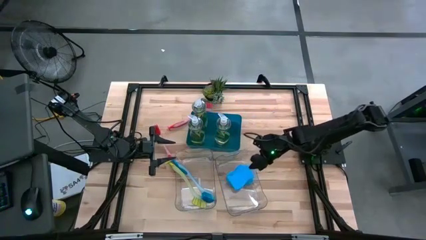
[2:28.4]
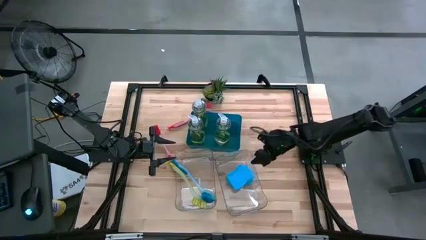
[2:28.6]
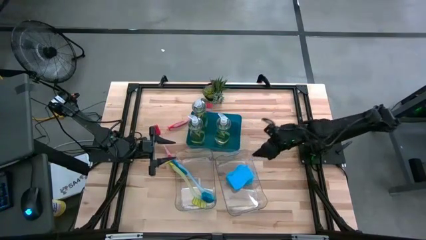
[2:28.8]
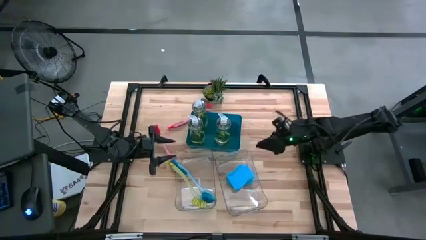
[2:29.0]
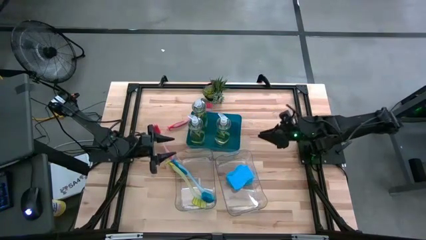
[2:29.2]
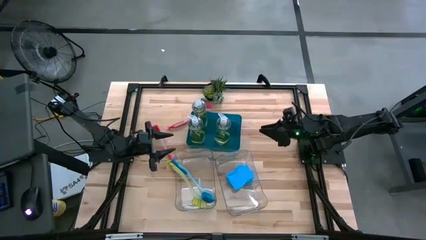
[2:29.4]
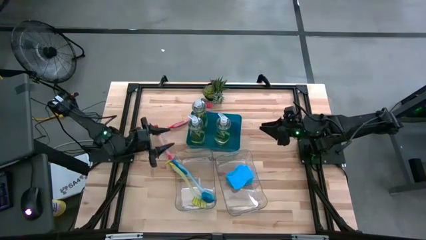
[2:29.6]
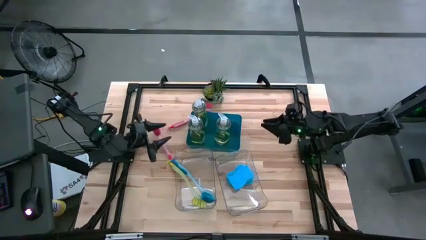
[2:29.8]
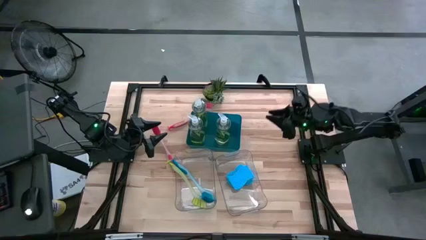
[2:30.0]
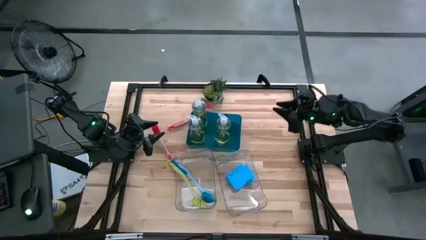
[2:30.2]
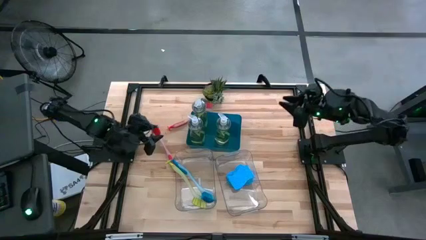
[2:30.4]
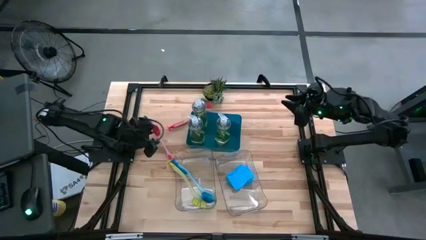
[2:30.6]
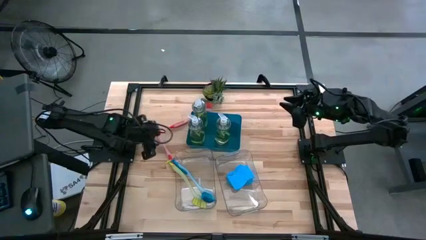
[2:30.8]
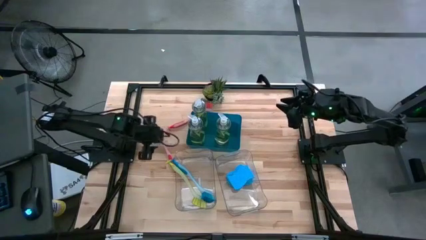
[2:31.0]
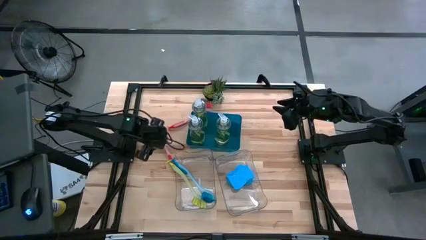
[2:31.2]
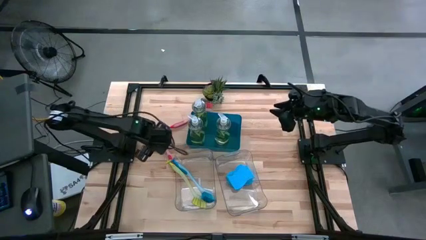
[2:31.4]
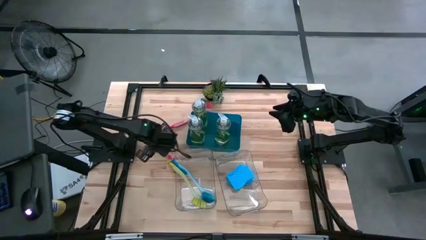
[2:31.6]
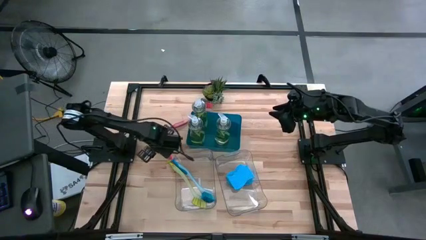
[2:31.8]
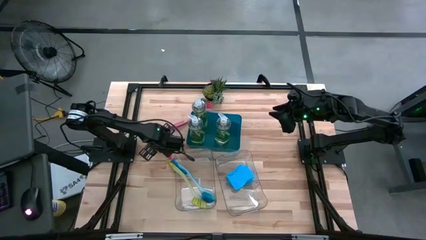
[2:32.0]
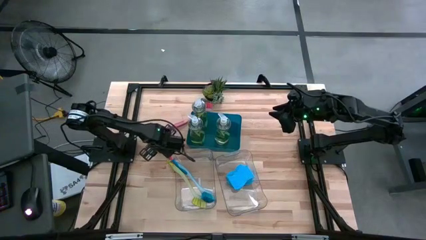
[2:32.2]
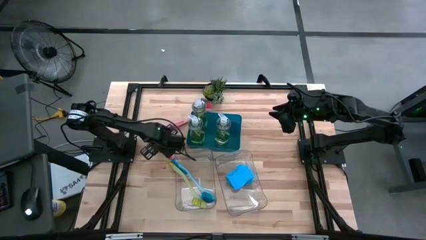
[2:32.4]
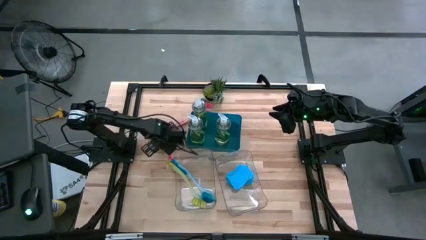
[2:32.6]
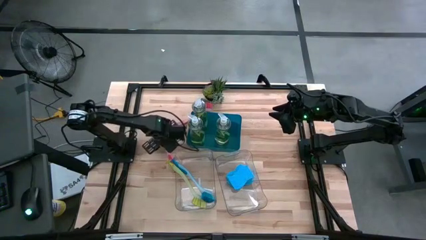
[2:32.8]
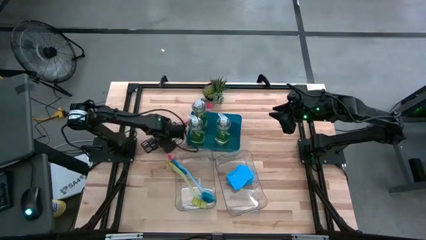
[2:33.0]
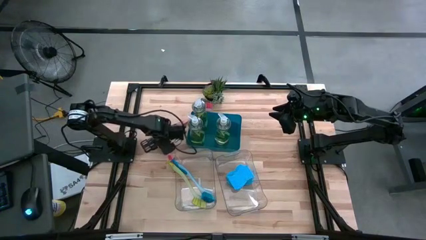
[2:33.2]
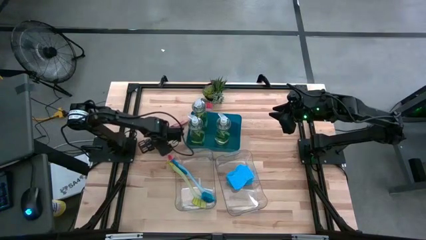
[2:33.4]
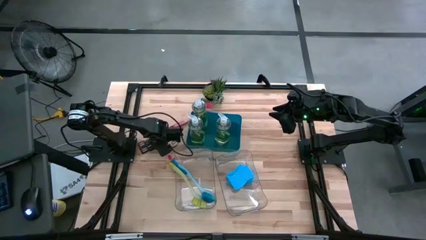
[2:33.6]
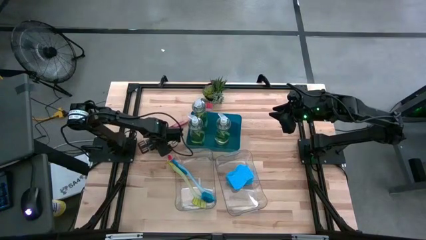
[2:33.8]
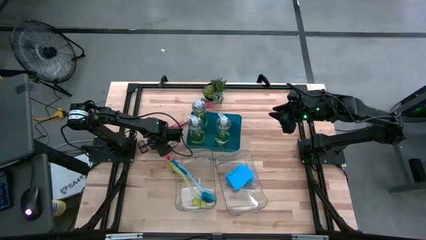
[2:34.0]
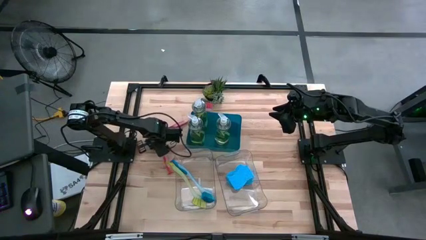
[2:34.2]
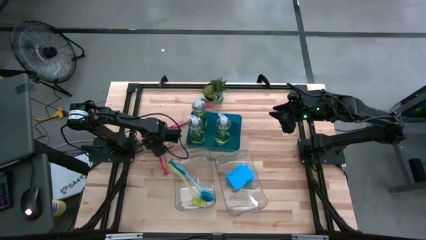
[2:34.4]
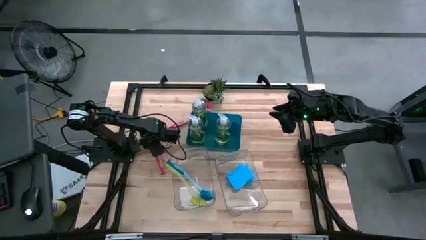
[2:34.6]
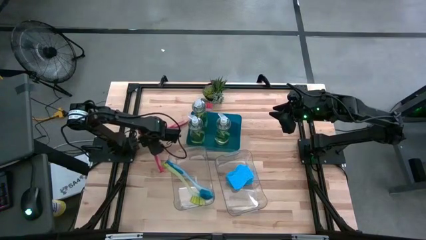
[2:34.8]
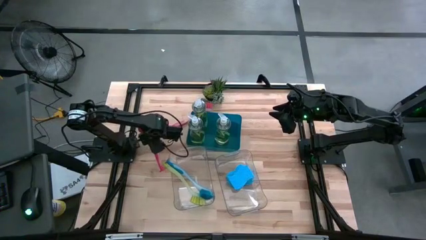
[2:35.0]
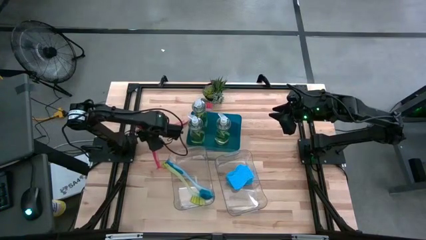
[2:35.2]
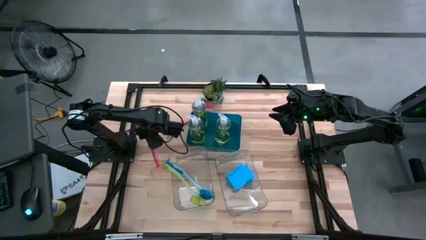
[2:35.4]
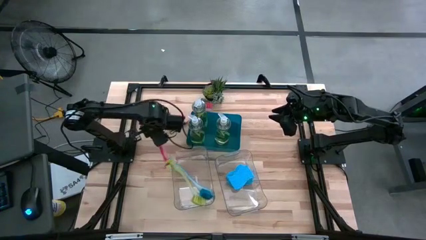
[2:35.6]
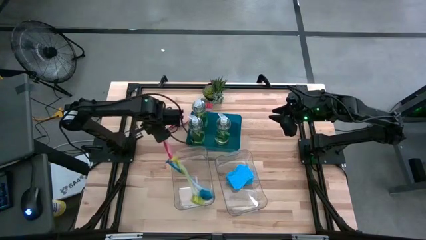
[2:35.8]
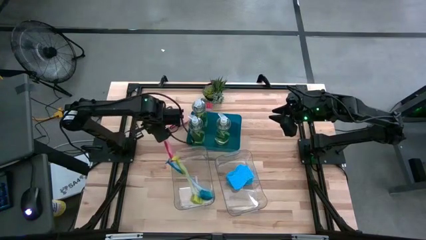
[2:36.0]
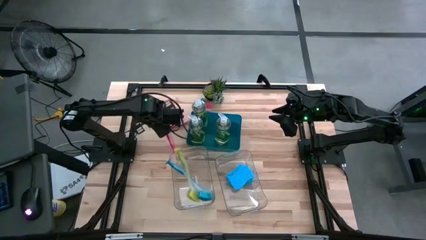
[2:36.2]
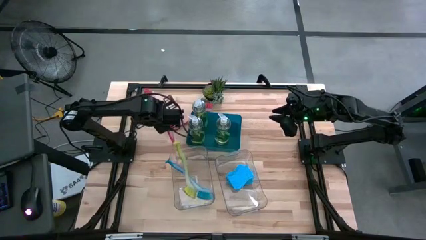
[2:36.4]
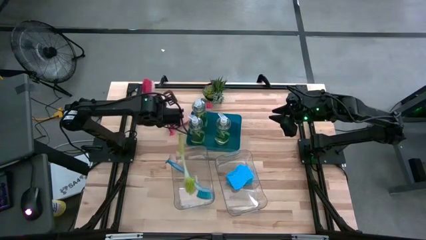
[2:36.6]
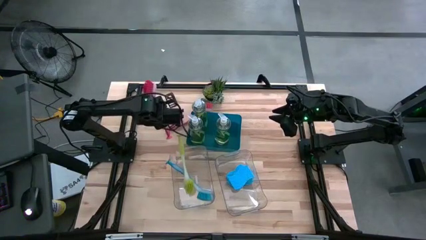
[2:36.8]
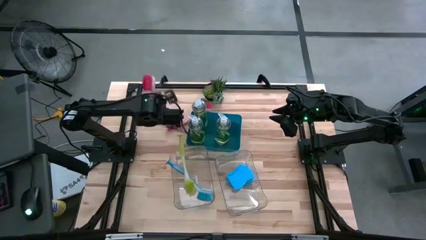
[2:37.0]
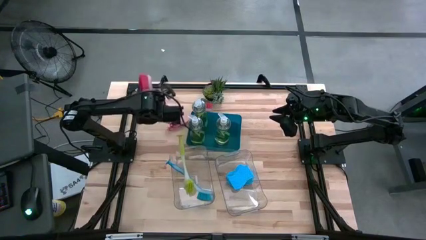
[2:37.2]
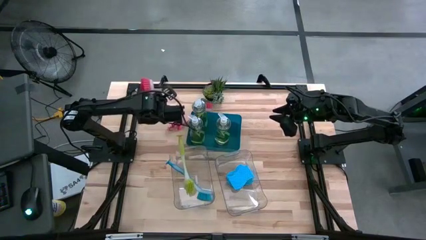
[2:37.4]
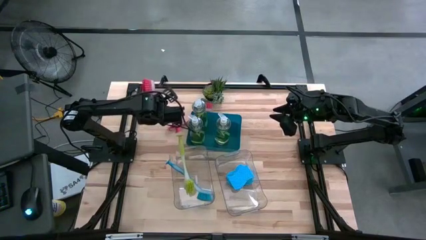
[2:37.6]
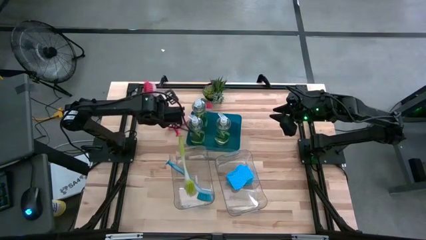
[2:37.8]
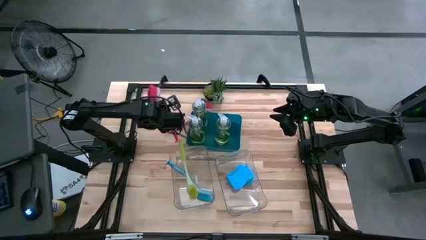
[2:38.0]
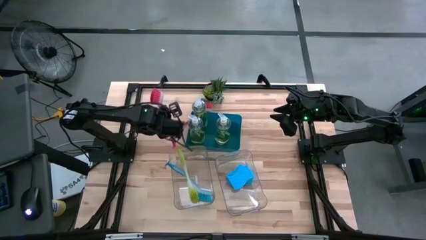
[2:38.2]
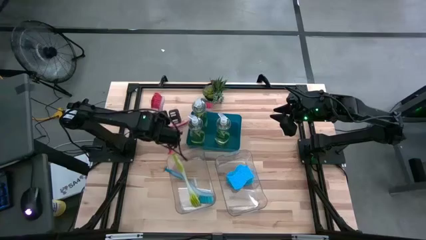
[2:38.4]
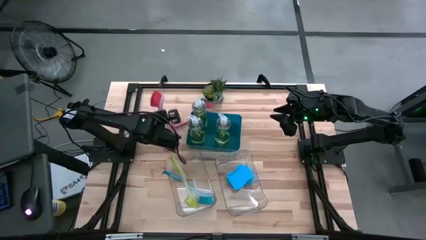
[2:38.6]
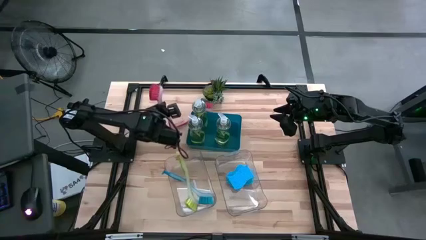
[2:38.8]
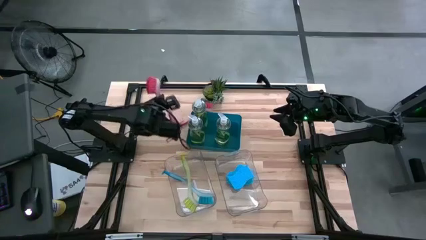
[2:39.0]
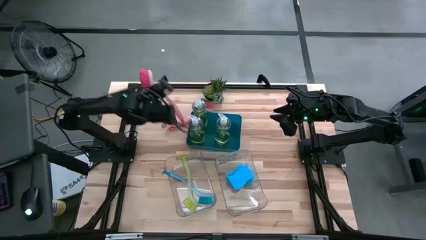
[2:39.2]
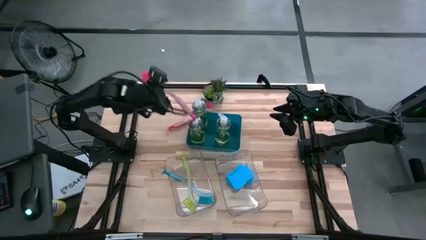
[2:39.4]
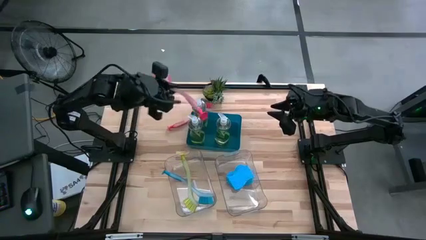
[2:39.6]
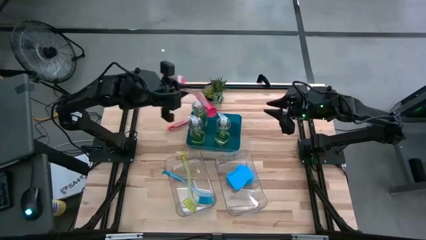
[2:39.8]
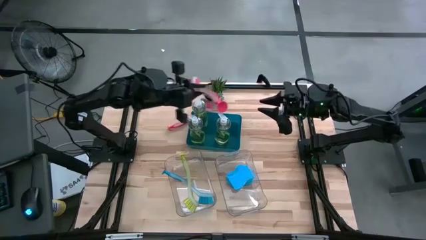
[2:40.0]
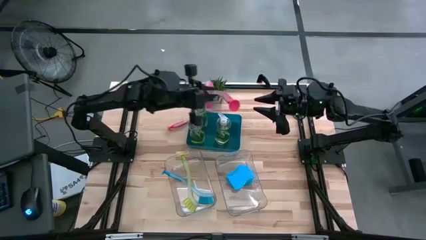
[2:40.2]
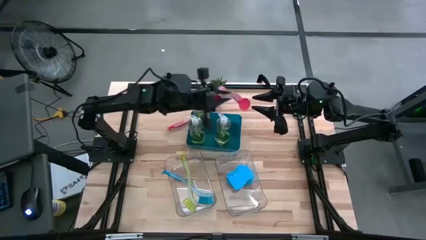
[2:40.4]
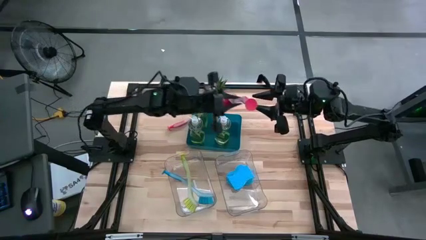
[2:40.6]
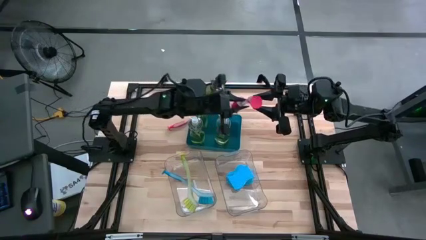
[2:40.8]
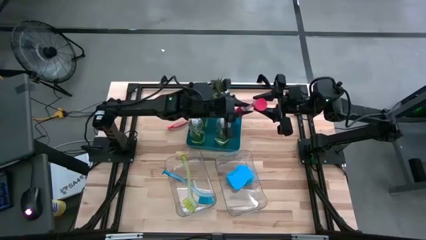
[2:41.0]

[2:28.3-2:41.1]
Task: Pick & Place Kitchen Sink Supplies
Put the red dish brush into the left transparent bin
